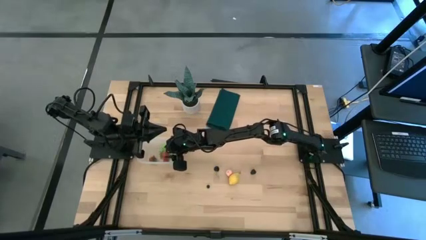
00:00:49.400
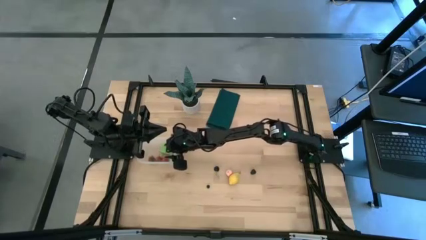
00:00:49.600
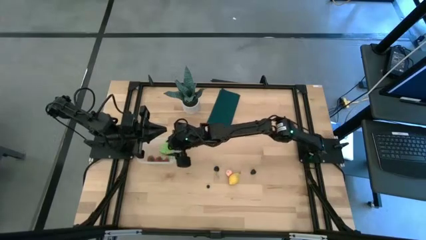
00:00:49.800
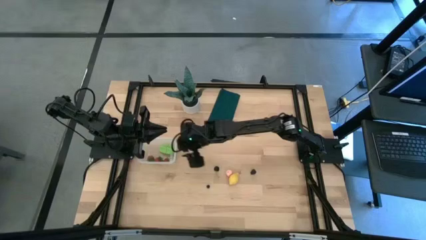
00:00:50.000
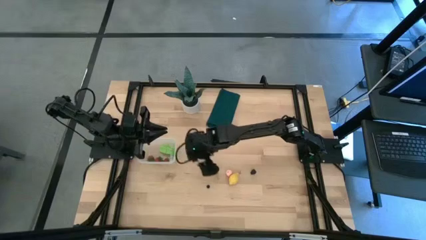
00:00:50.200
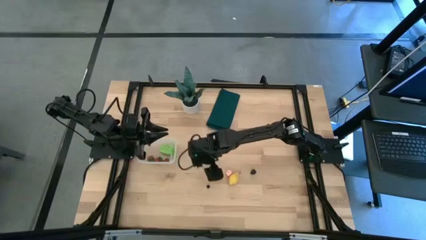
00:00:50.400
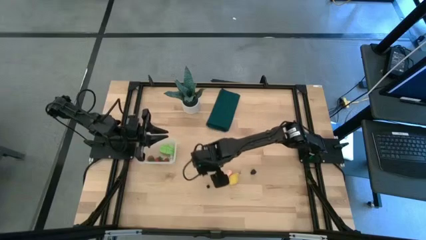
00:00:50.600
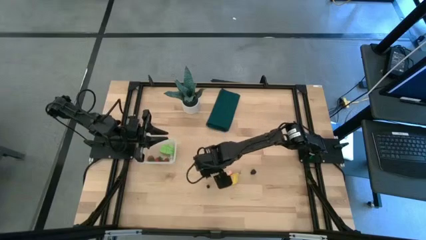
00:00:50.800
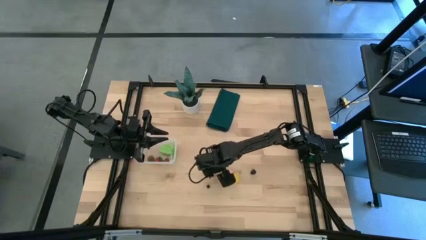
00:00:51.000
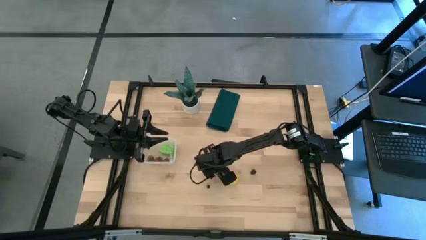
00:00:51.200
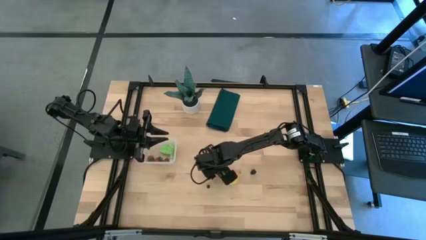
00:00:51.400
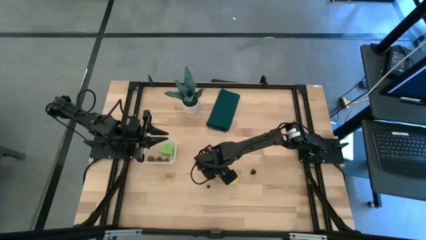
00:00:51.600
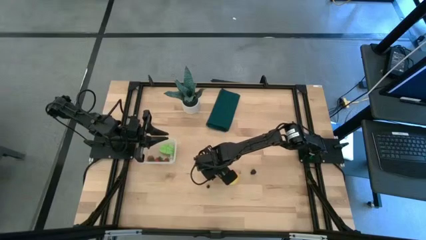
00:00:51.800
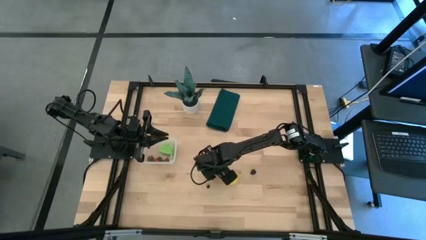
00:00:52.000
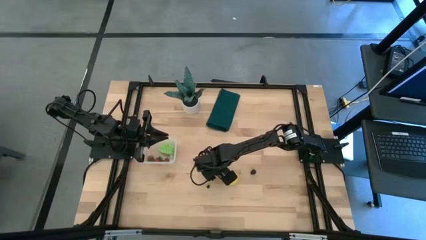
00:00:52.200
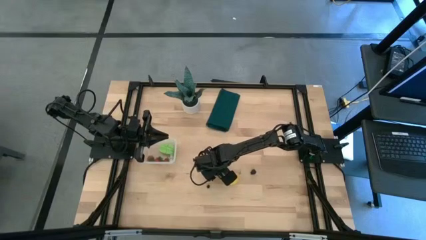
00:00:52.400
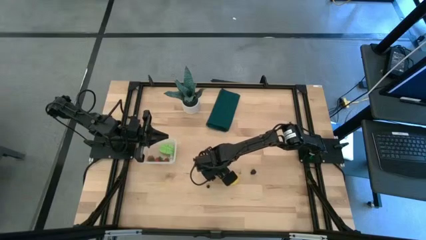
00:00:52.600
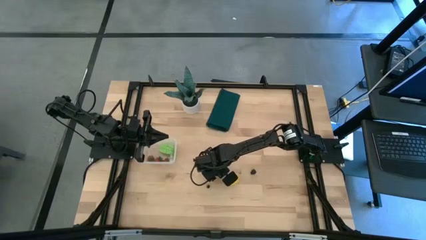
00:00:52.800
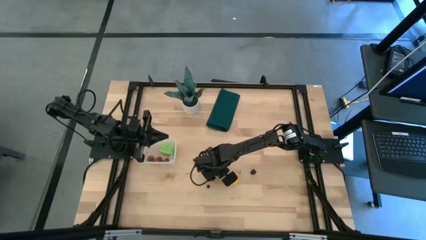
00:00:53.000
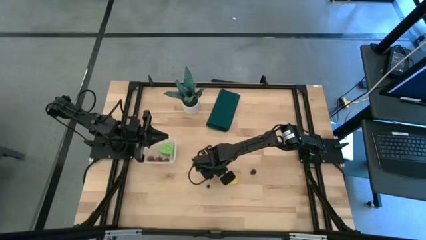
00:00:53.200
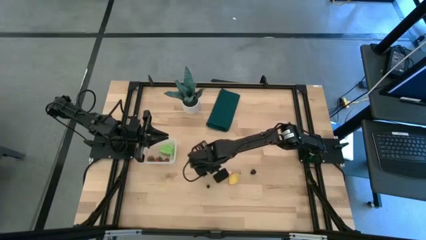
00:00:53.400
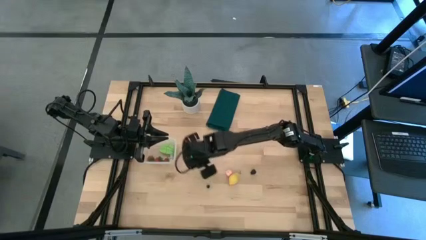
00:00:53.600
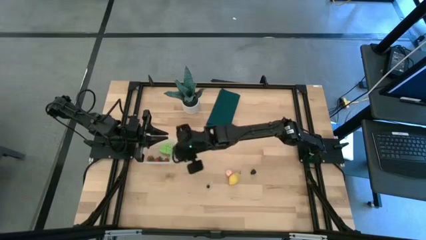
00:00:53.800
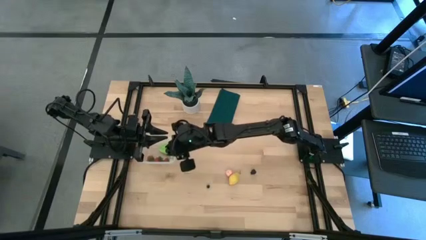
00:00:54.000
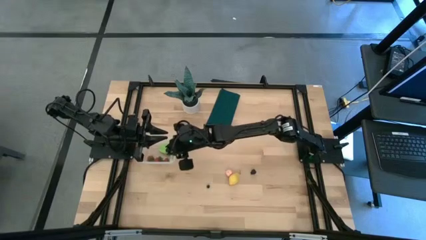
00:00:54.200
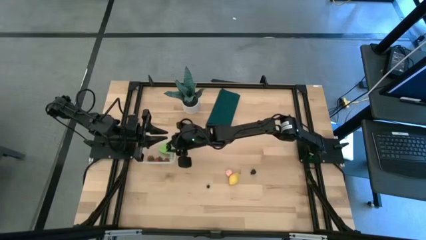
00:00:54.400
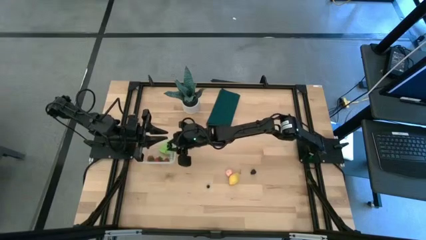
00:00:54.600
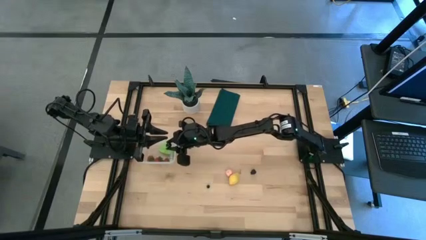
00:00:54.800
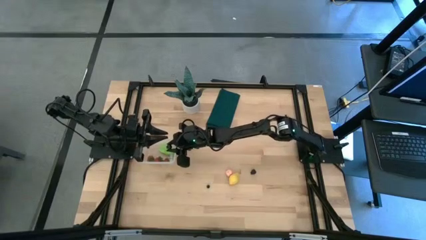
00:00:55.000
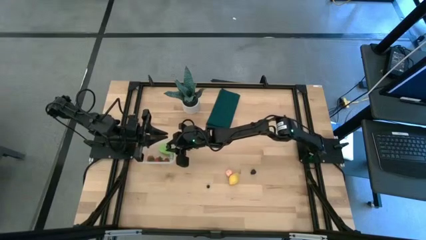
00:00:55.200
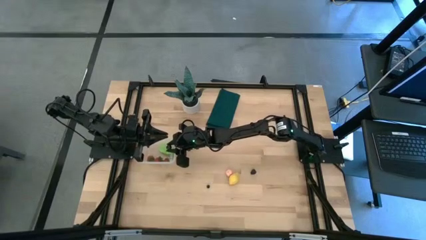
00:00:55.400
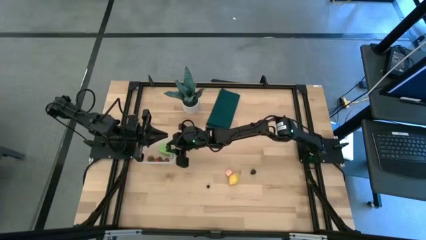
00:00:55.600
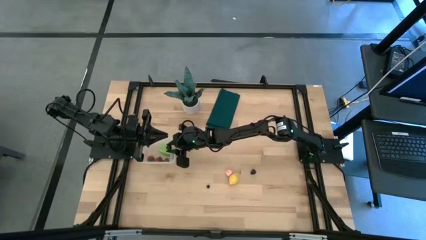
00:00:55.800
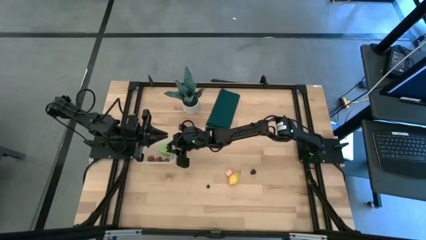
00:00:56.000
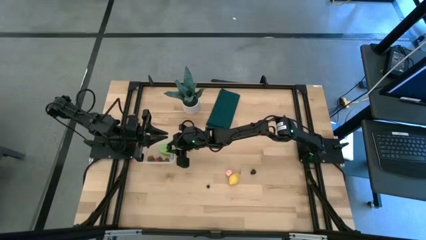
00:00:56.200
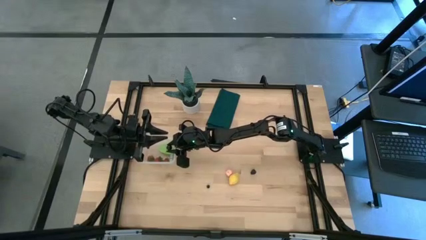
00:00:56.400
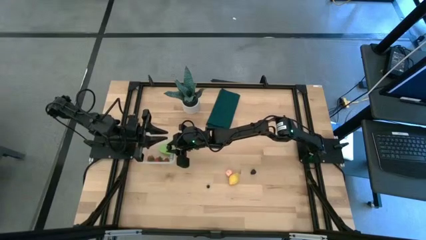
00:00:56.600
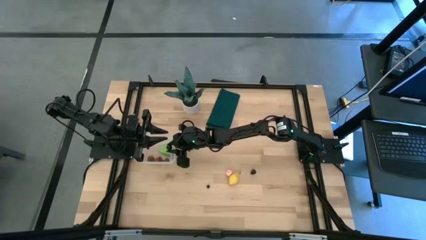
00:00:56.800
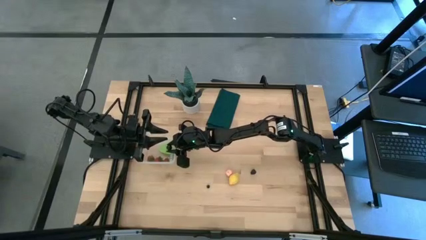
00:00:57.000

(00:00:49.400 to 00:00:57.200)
Task: Pick and placing Produce into tupperware
Put the black cherry into the transparent bin

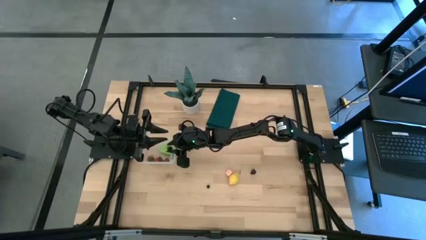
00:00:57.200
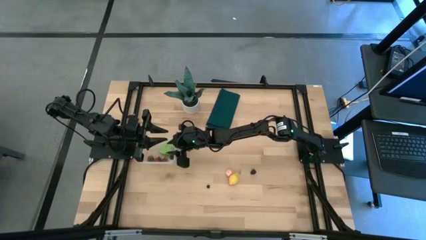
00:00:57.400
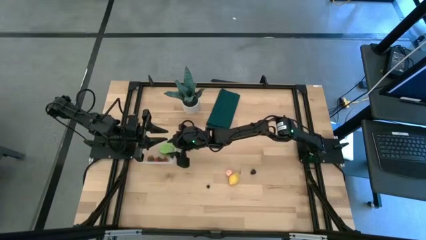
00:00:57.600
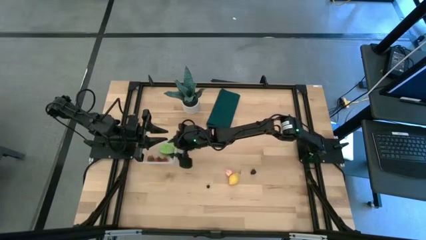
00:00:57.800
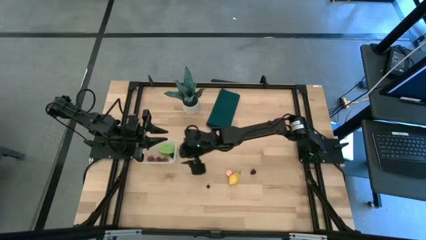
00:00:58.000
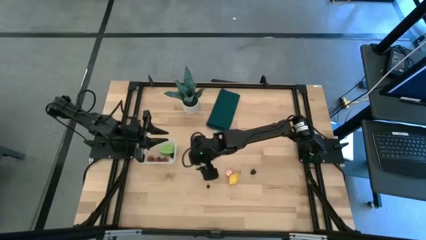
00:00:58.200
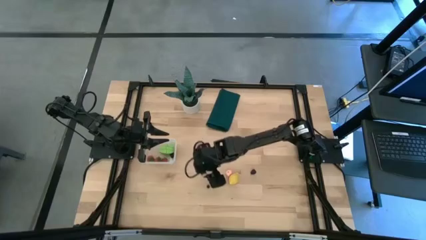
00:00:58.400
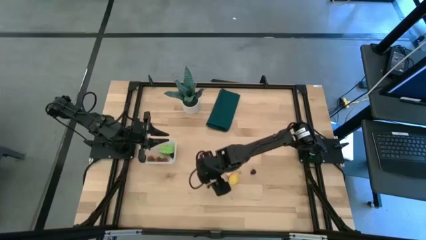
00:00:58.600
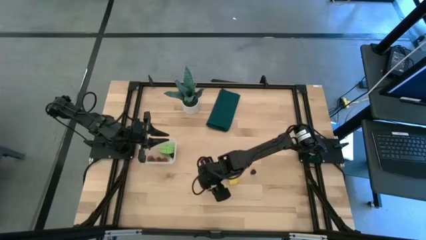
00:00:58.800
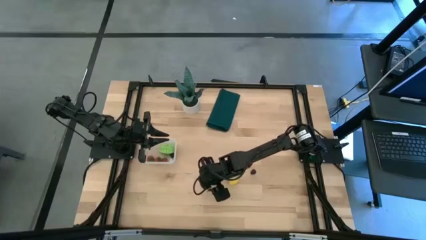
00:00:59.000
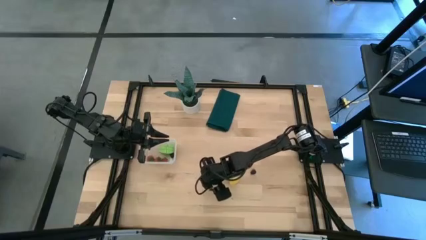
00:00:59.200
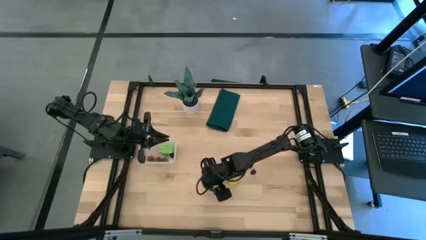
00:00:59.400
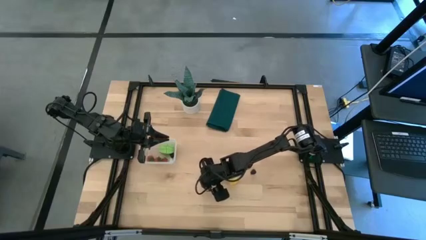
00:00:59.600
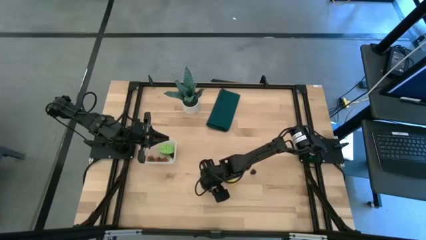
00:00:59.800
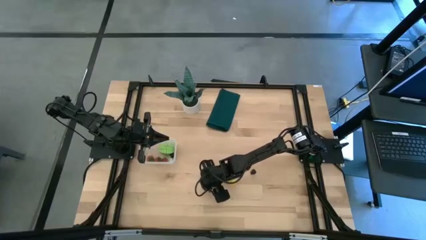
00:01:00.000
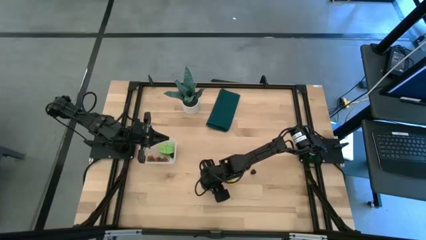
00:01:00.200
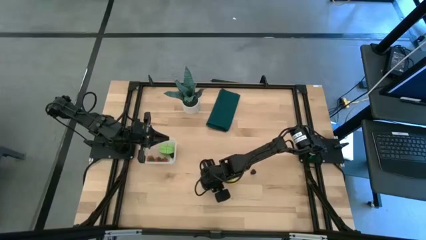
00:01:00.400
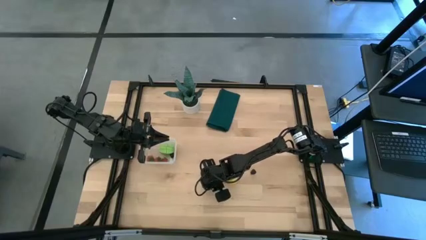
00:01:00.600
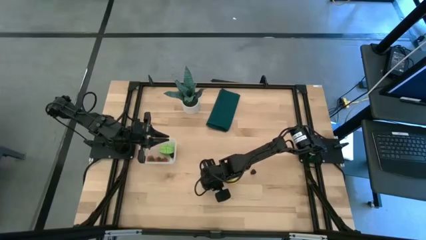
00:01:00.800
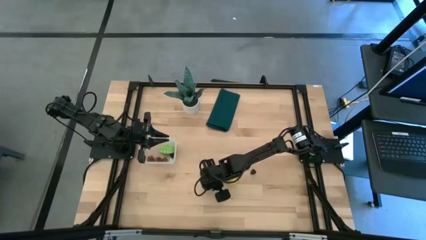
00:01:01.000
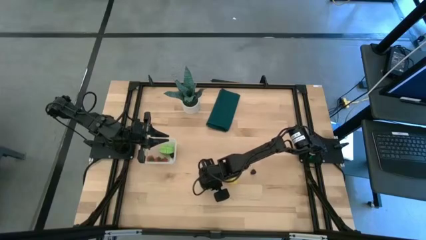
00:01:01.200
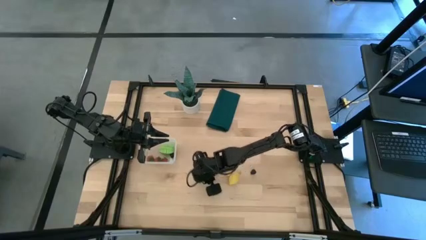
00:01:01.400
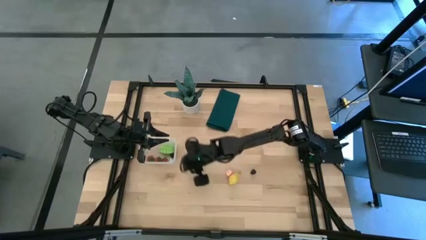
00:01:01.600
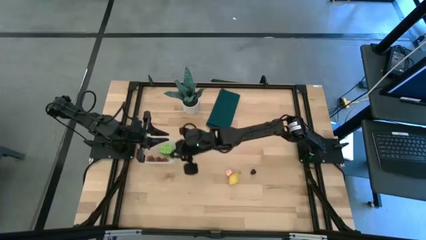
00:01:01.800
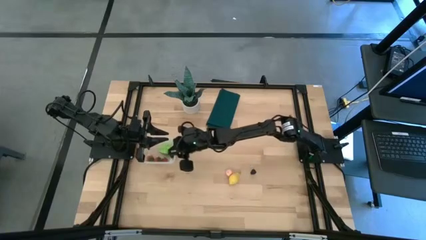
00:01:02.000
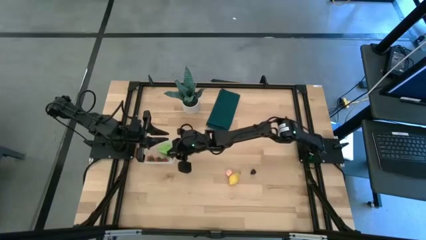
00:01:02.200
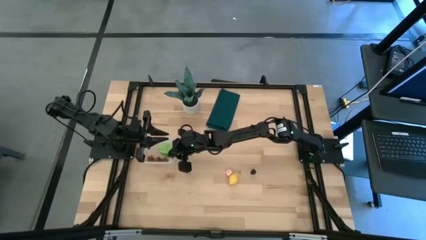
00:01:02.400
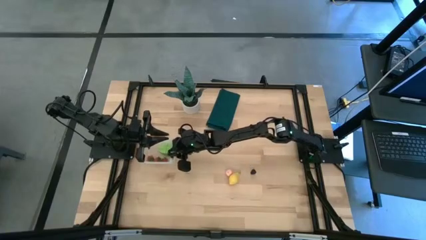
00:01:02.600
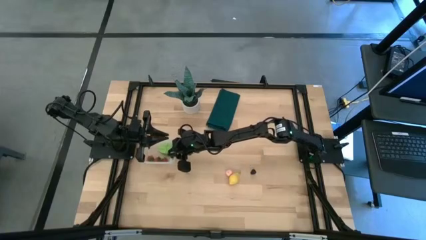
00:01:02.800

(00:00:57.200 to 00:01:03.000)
Put the blueberry into the transparent bin

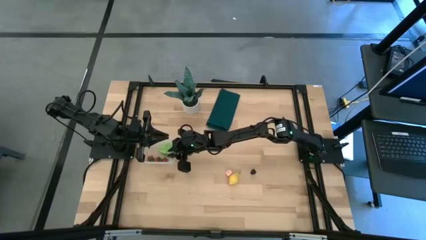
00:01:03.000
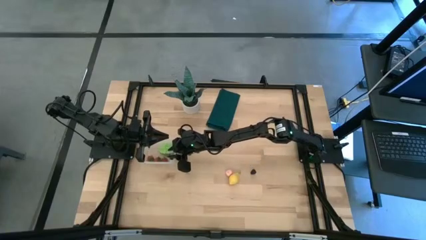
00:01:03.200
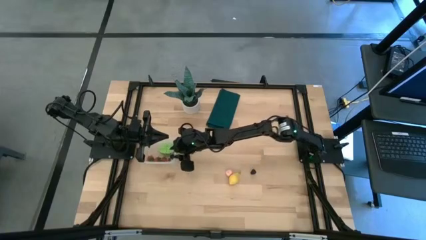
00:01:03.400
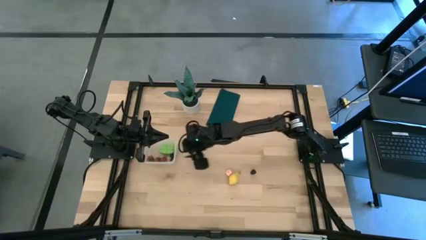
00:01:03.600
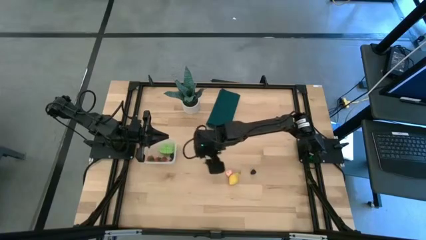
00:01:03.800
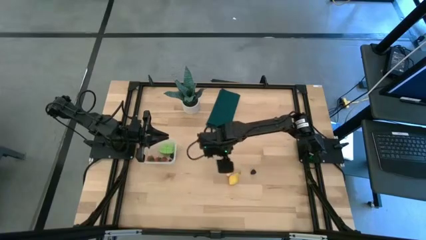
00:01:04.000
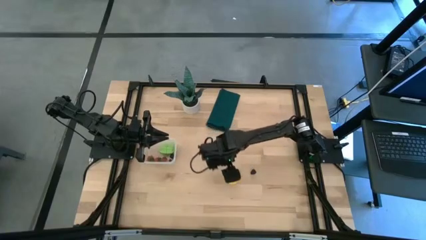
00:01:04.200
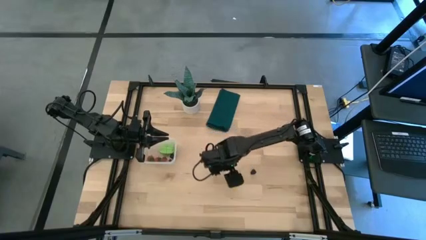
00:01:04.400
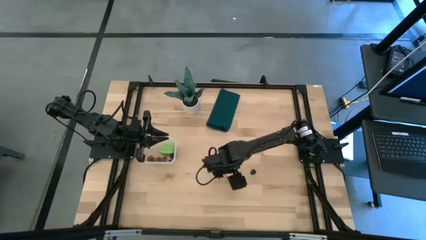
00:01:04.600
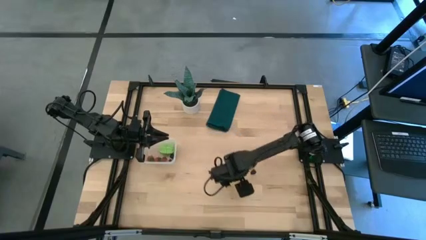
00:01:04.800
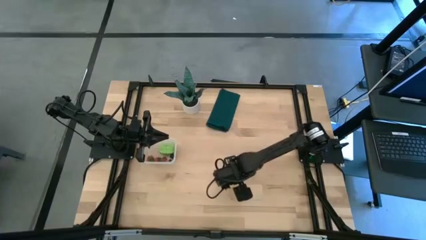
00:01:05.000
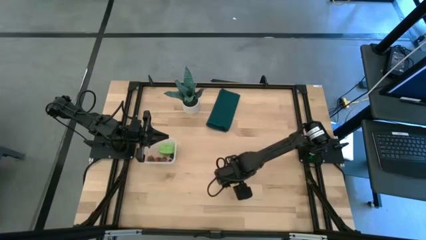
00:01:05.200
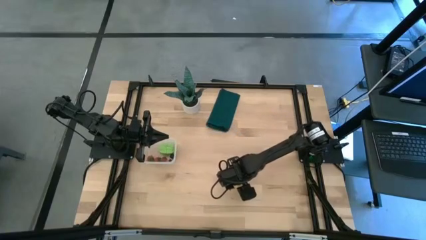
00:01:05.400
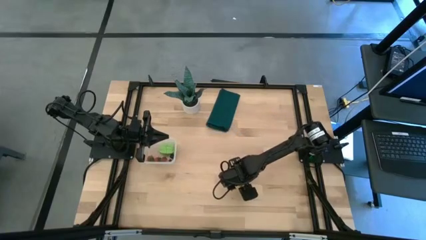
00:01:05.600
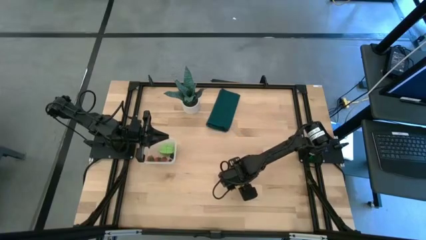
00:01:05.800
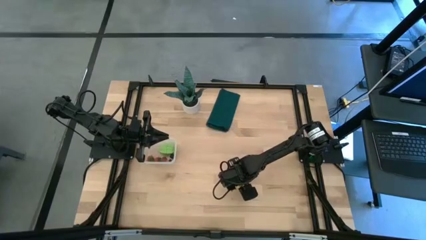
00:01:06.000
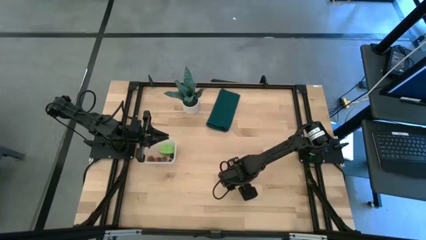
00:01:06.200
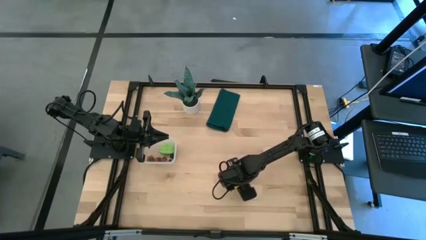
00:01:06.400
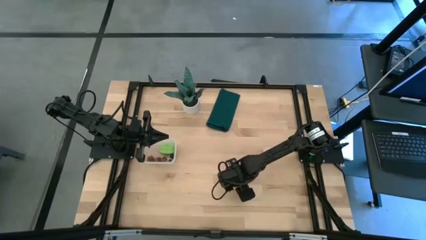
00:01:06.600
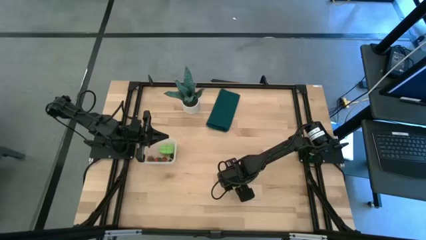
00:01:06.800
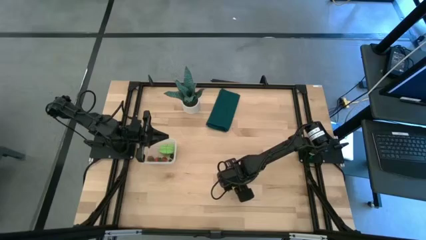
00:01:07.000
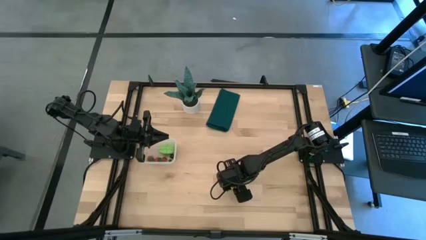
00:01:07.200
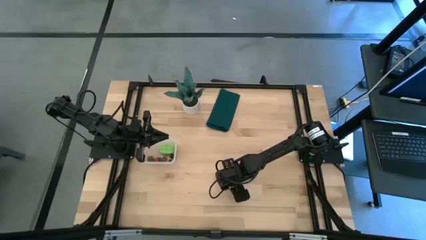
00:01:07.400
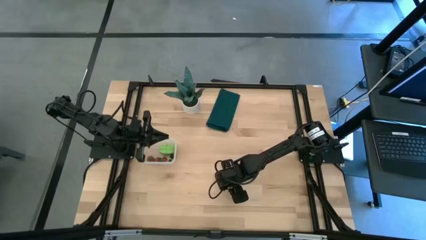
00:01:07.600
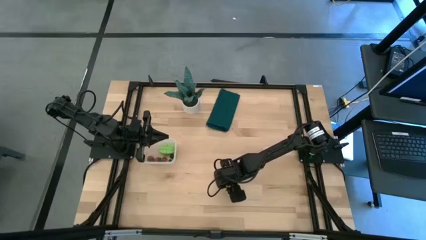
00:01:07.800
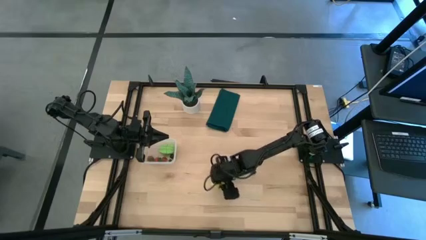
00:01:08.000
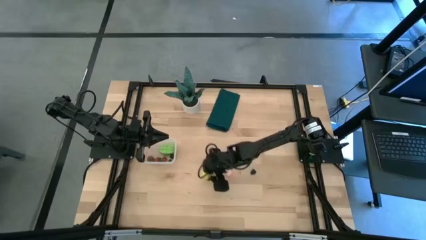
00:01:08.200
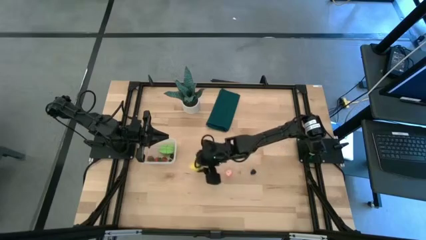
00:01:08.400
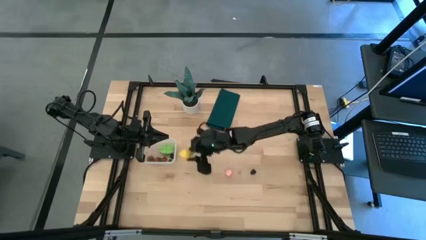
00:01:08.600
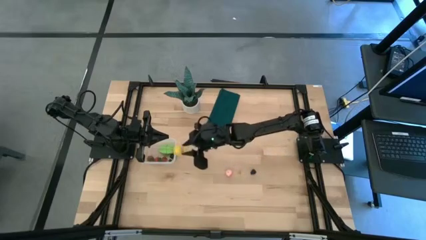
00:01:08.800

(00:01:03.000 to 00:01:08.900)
Put the lemon into the transparent bin
